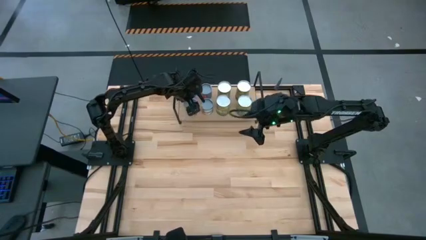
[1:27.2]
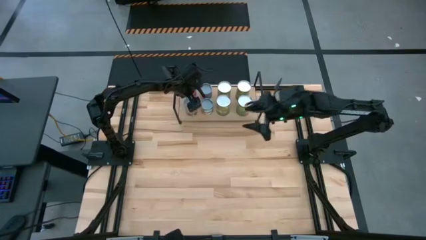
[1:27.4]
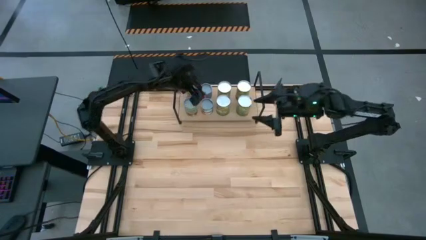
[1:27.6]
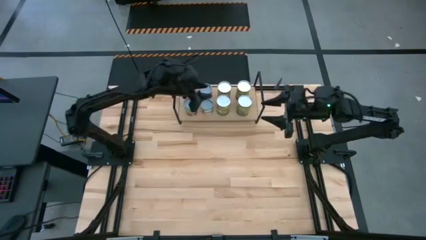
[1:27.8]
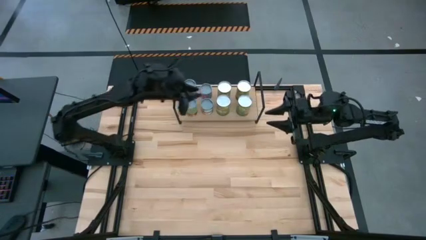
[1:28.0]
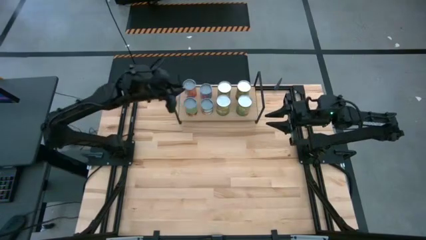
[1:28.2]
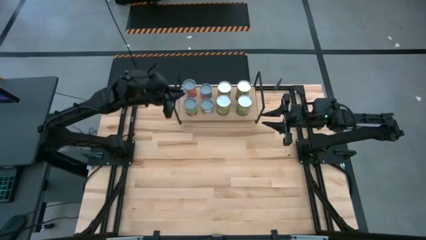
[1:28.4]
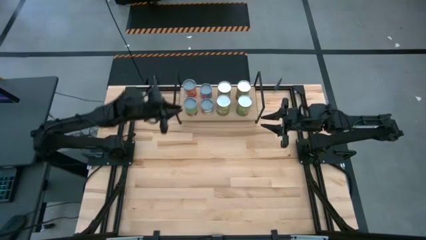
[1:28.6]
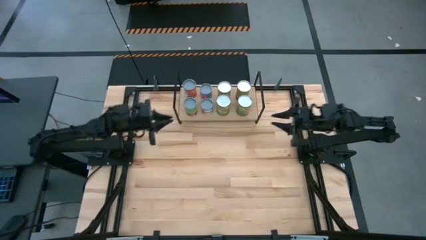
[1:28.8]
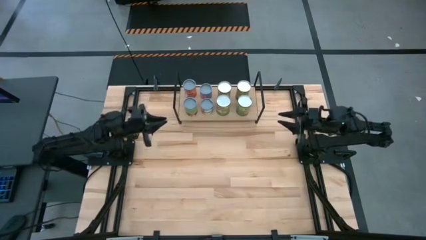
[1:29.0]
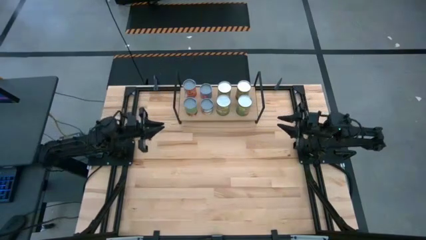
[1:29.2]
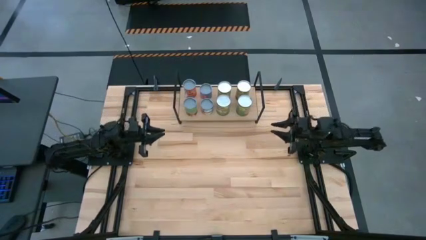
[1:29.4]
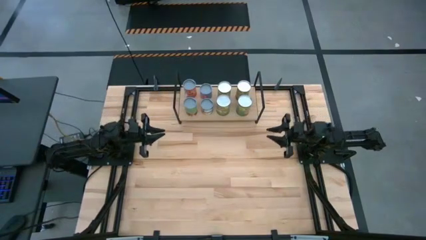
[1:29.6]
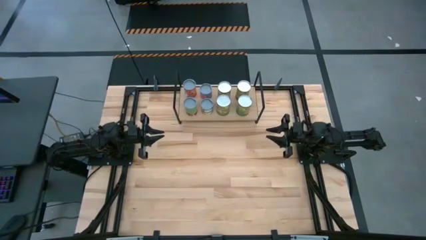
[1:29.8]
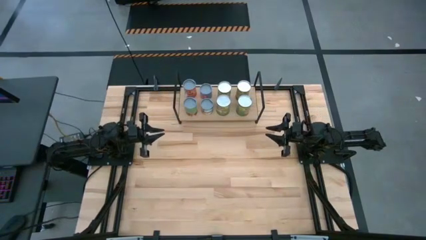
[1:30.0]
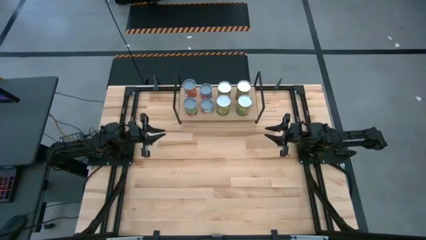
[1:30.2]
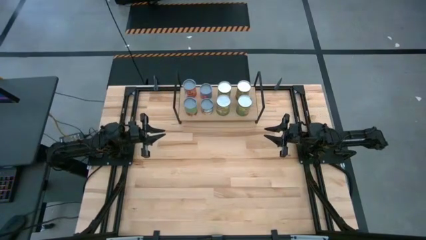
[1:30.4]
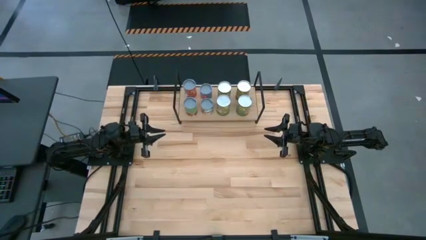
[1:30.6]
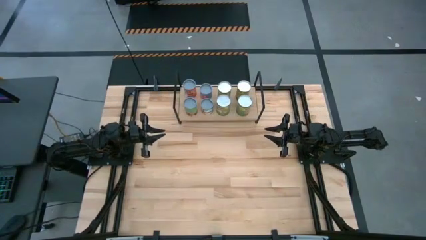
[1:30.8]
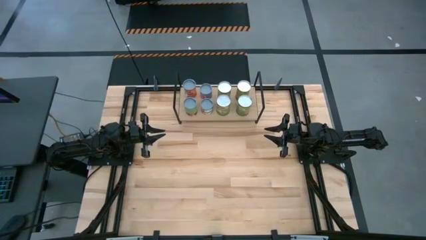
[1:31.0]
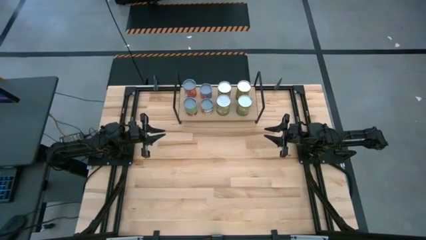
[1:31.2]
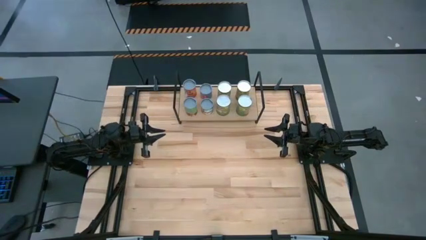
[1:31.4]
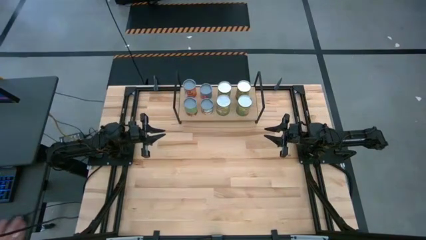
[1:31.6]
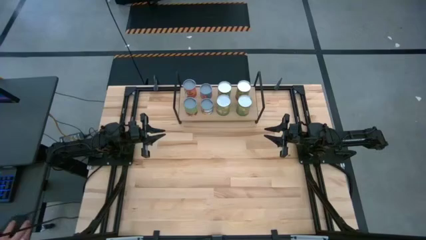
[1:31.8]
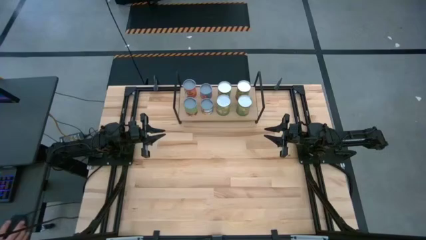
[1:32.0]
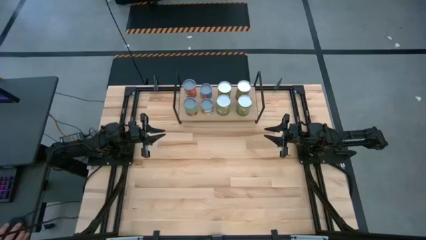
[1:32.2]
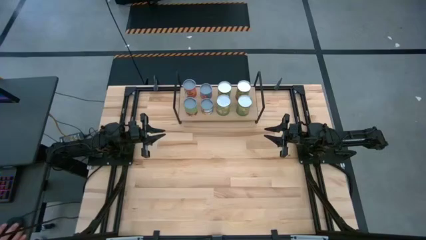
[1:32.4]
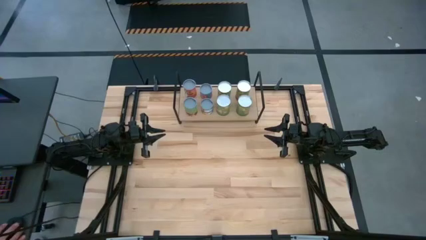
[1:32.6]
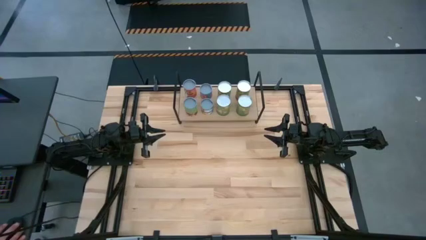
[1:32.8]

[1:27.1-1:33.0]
Task: Pick and place cans onto a shelf
Return to Home Position

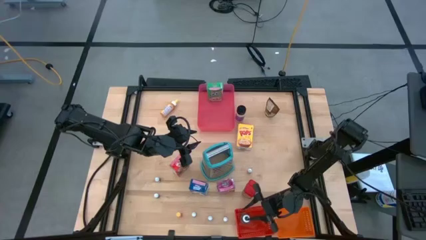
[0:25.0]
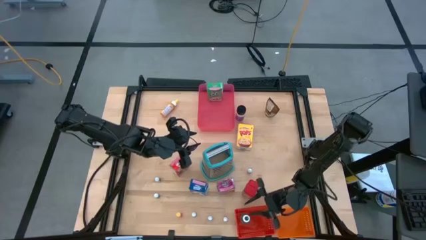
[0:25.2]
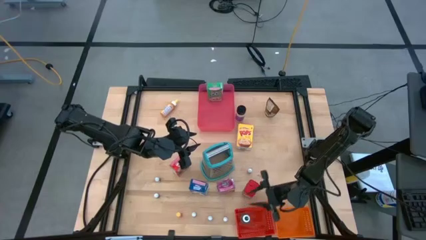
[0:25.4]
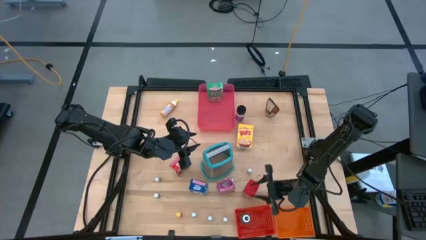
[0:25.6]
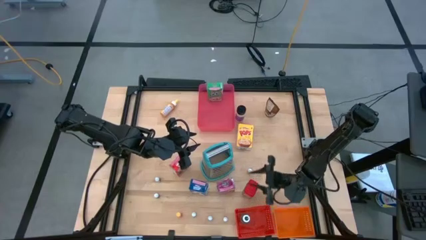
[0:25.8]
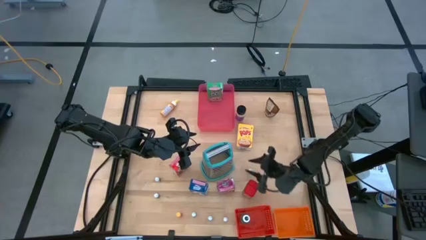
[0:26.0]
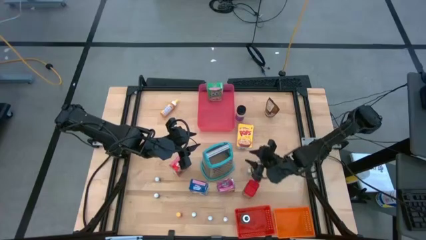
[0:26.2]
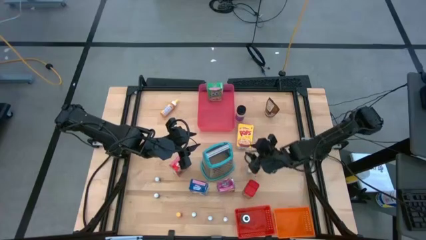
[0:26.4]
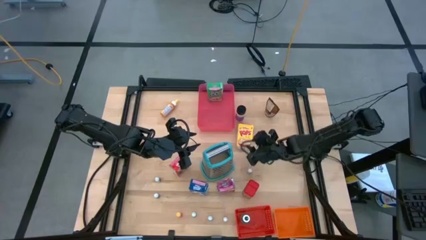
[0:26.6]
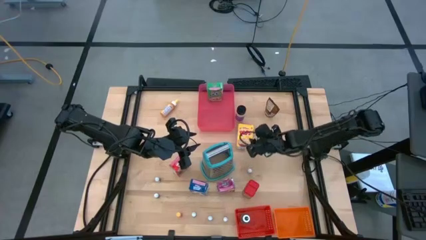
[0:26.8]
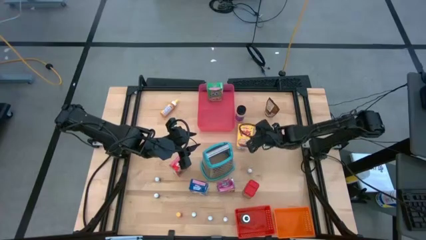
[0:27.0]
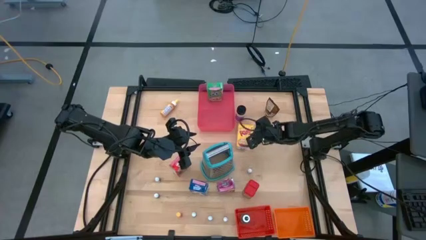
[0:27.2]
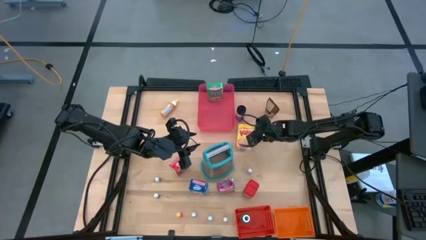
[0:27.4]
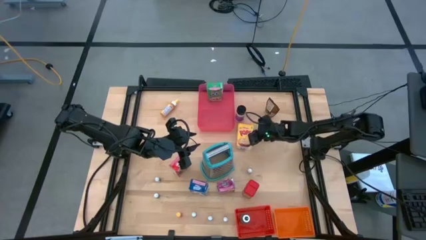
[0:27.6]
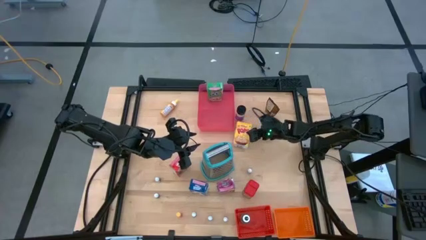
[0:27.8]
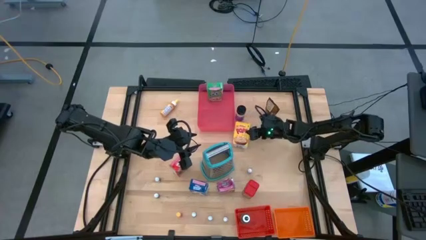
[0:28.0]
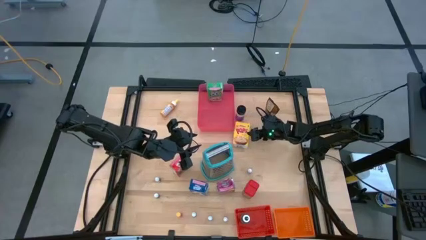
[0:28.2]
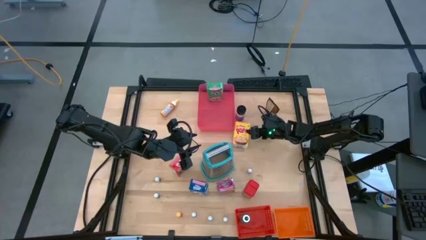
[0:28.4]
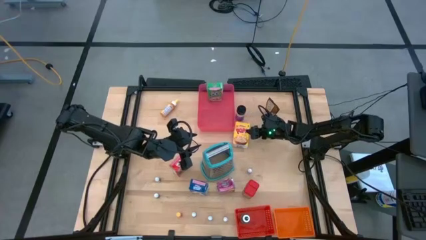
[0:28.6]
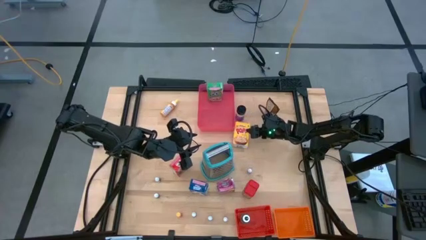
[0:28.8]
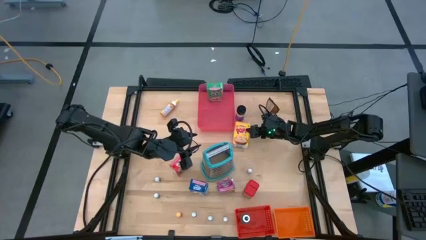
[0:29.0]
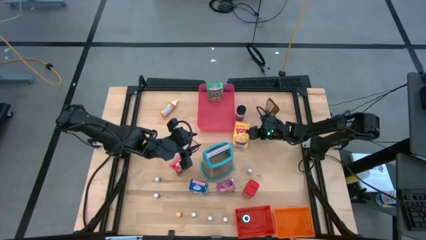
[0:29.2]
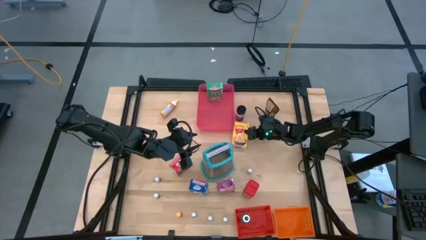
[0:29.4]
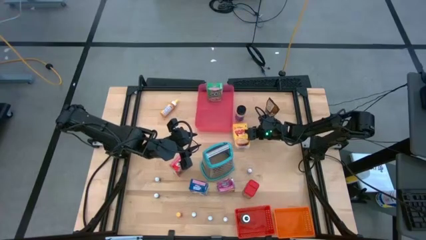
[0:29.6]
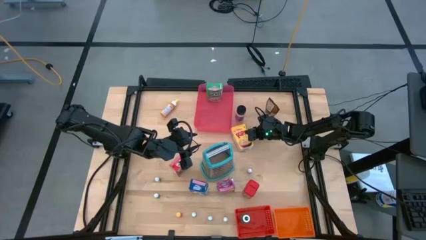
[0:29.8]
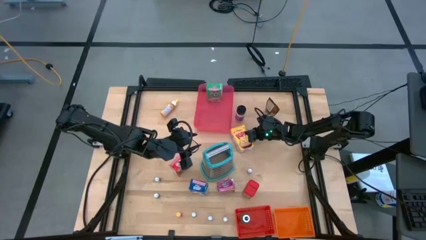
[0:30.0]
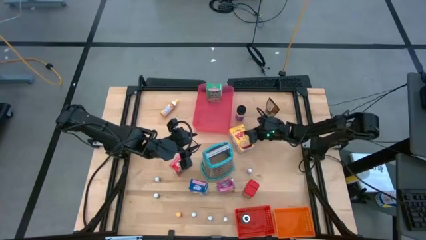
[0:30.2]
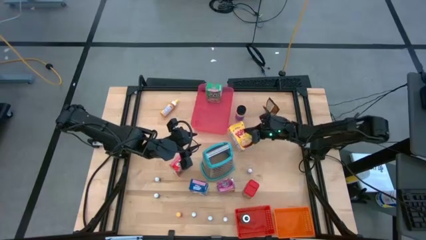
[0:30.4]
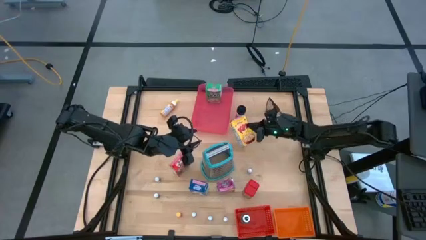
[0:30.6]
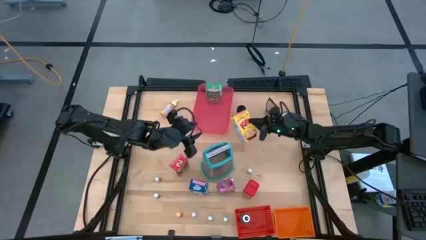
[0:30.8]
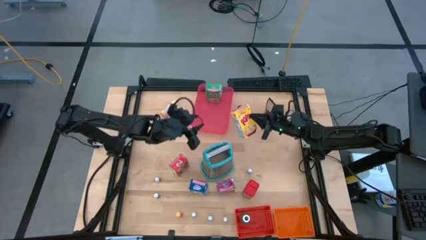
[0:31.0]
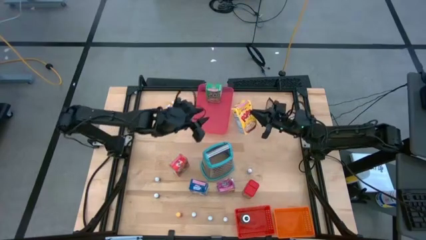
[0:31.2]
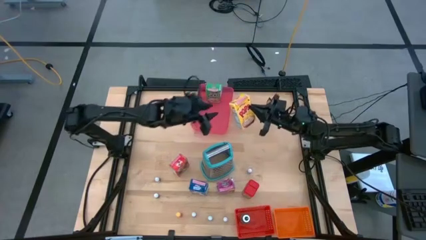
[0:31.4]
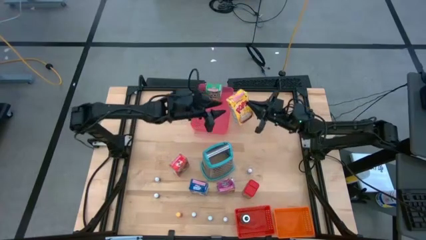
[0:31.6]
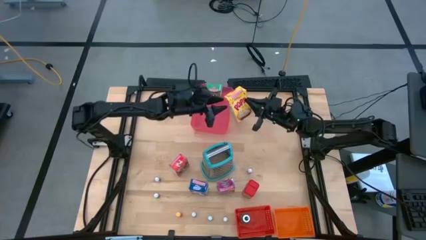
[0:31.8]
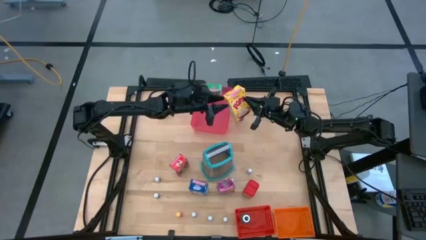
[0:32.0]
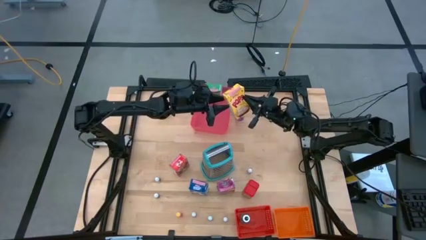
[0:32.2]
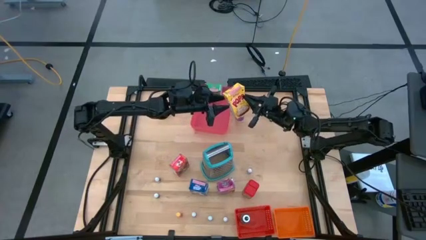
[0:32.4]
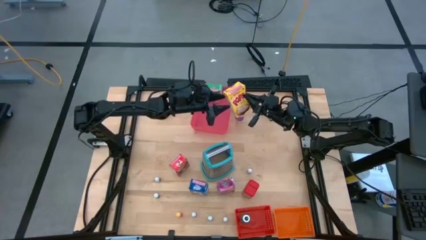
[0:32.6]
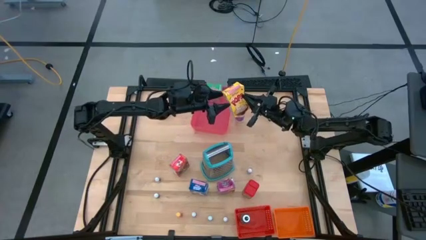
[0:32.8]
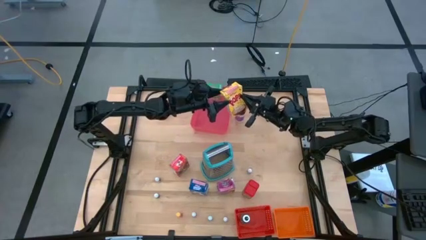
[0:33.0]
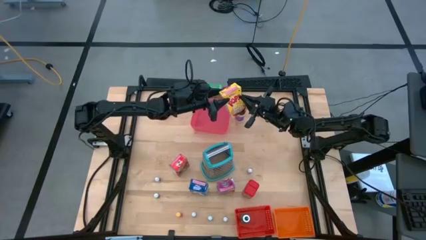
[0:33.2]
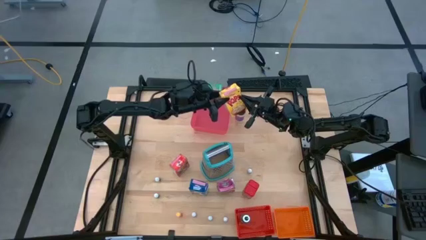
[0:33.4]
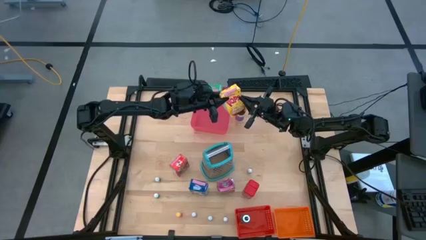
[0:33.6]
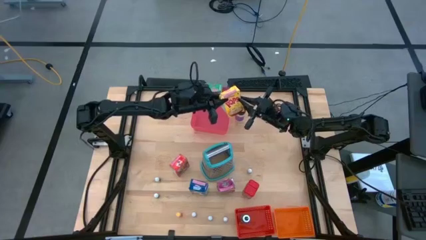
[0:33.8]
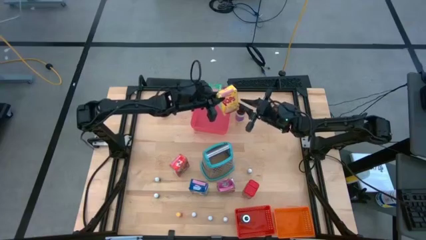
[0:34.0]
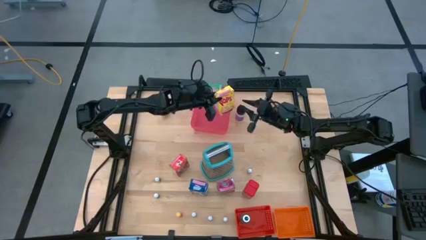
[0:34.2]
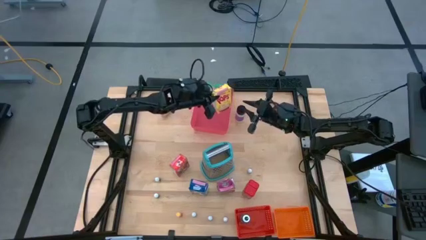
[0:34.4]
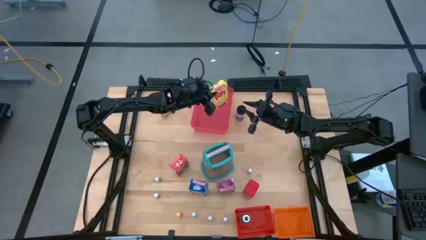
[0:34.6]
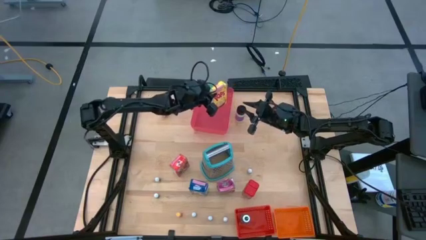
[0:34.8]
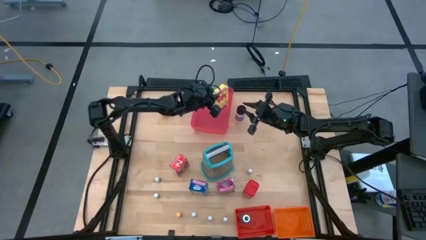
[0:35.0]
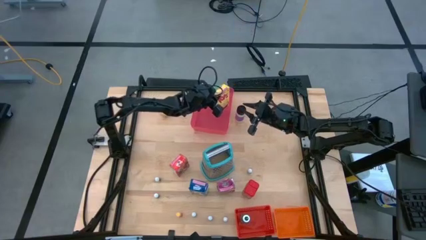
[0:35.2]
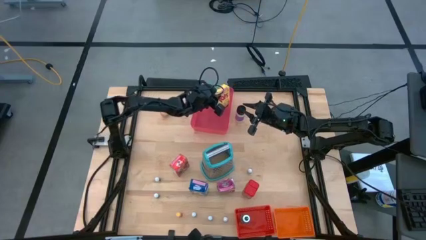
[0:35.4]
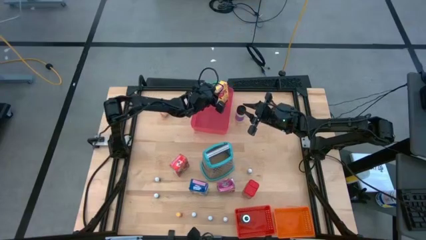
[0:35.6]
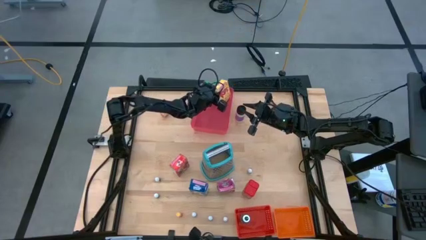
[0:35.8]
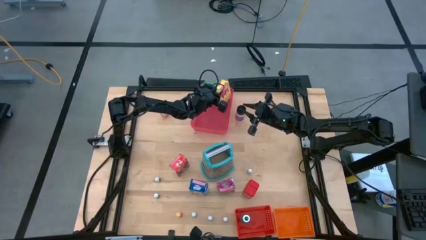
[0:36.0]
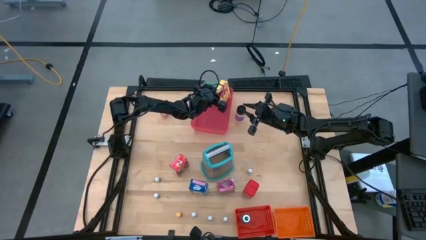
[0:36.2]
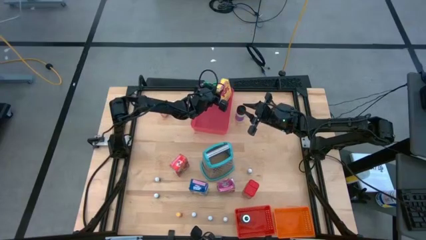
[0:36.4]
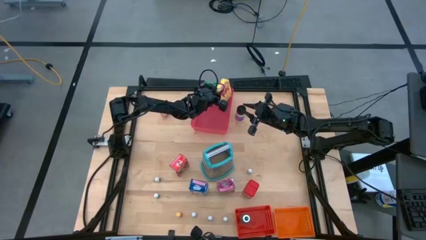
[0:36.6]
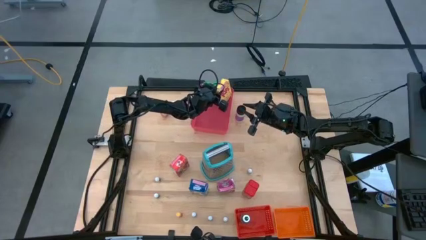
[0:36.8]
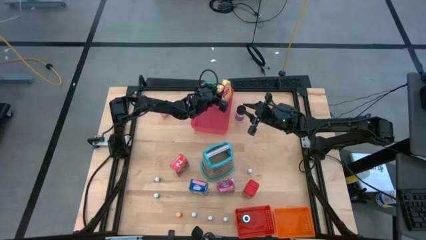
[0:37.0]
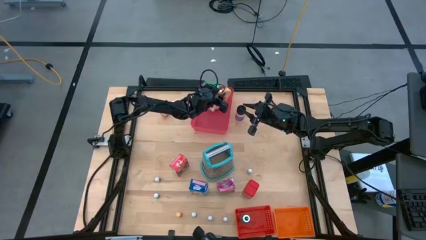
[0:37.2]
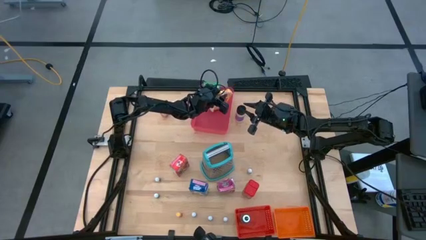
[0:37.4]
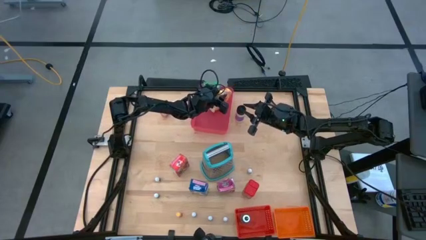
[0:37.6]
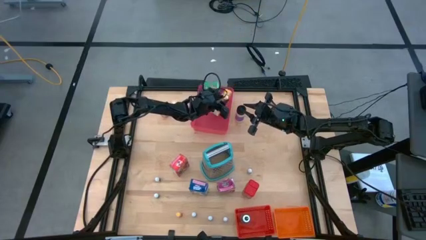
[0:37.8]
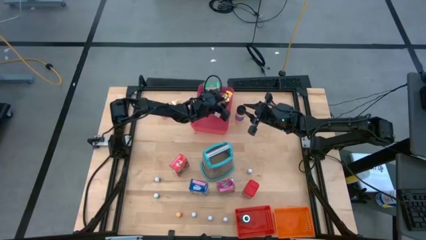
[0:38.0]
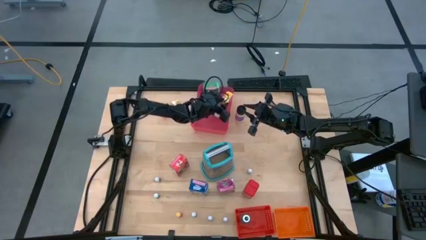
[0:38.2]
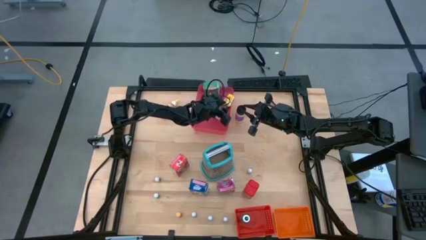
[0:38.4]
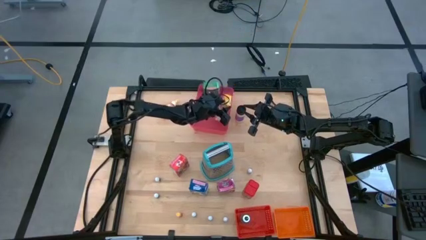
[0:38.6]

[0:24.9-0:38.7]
Task: Pick & Place Kitchen Items
Put the yellow cereal box into the pink bin
